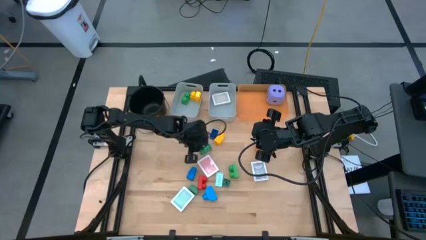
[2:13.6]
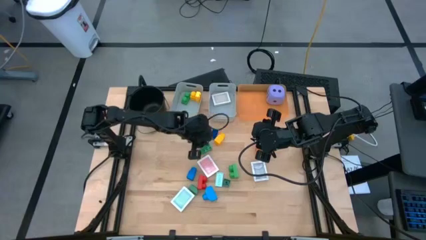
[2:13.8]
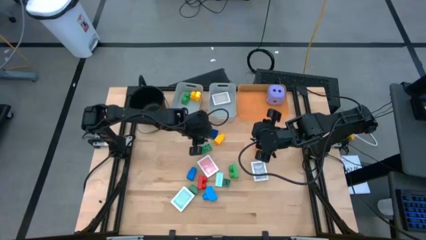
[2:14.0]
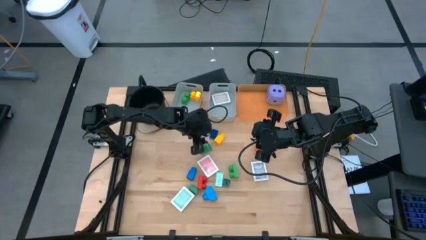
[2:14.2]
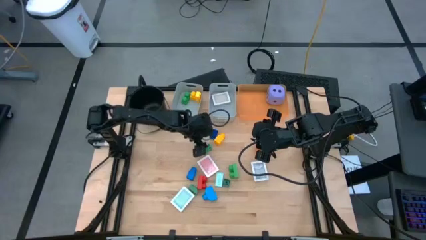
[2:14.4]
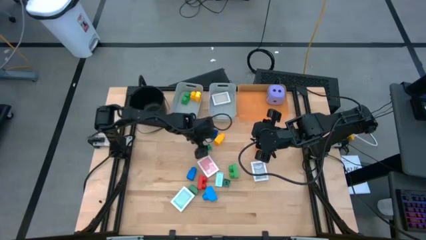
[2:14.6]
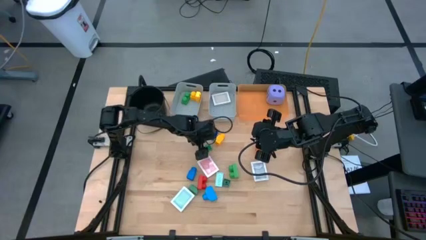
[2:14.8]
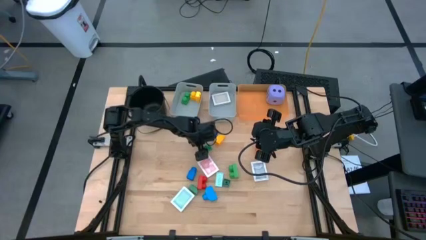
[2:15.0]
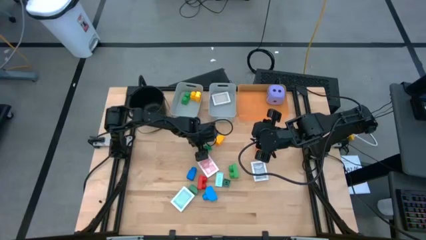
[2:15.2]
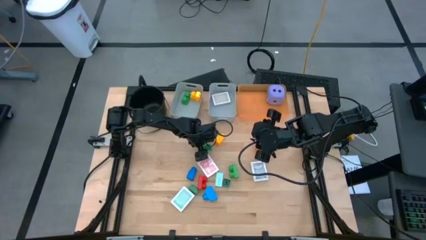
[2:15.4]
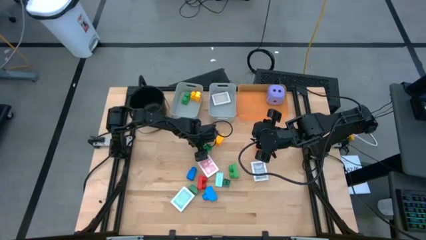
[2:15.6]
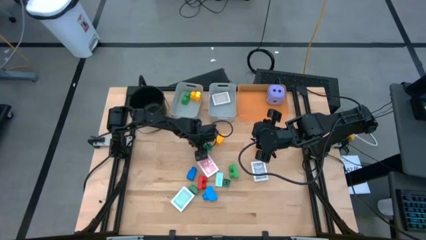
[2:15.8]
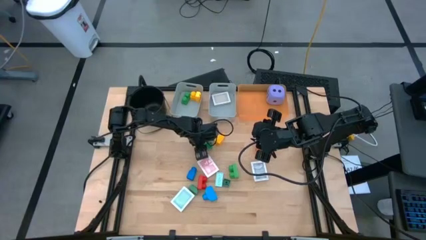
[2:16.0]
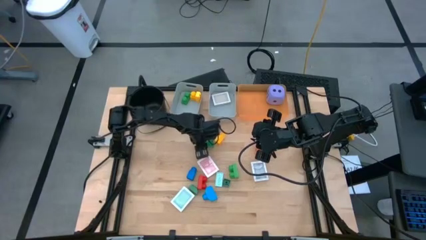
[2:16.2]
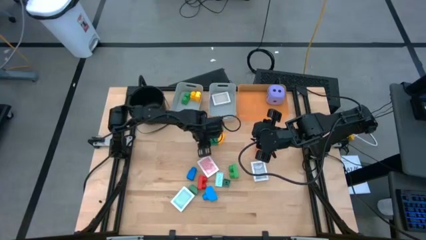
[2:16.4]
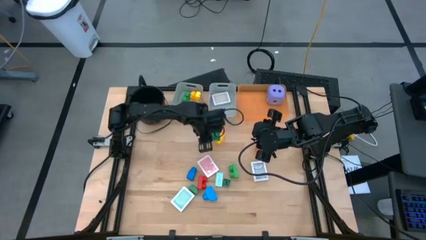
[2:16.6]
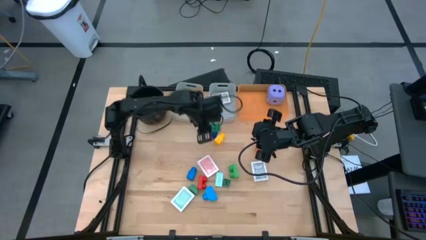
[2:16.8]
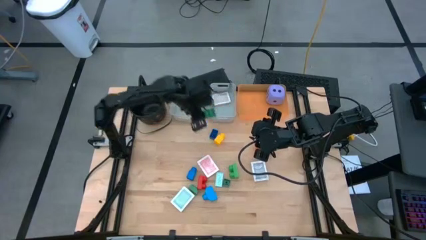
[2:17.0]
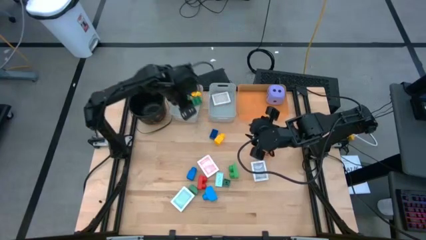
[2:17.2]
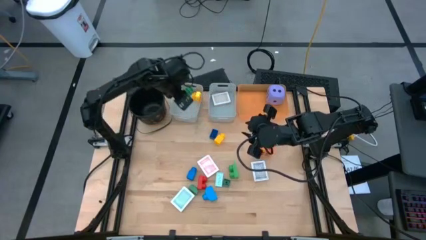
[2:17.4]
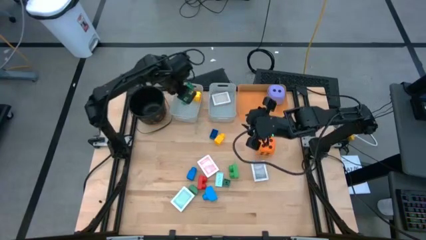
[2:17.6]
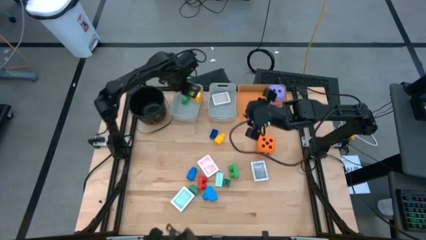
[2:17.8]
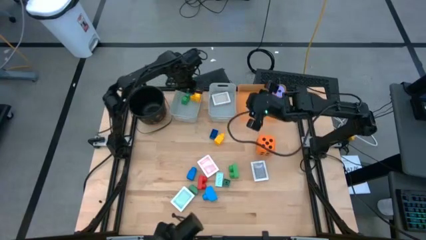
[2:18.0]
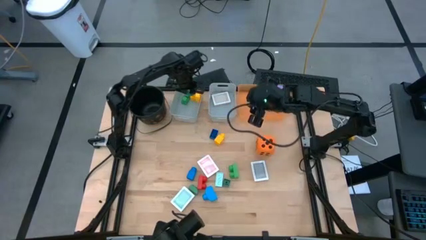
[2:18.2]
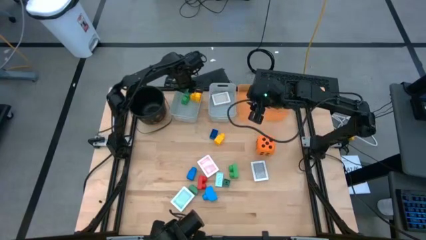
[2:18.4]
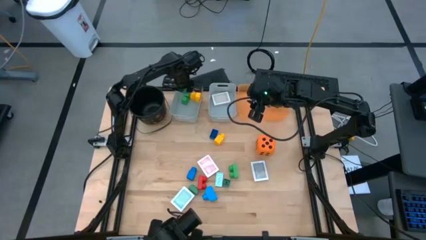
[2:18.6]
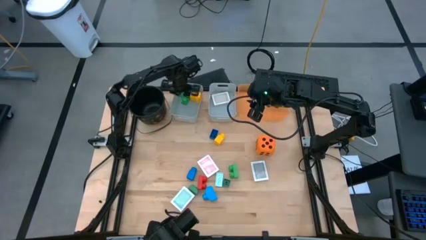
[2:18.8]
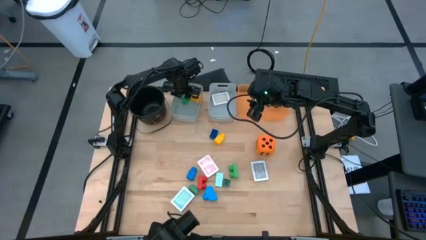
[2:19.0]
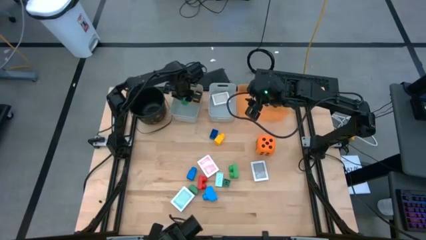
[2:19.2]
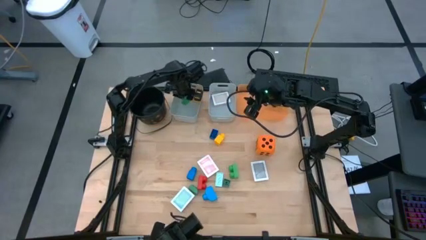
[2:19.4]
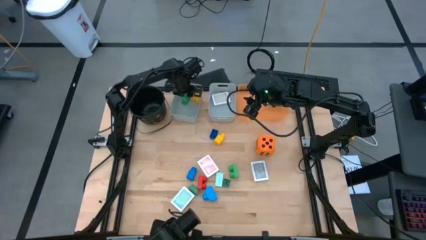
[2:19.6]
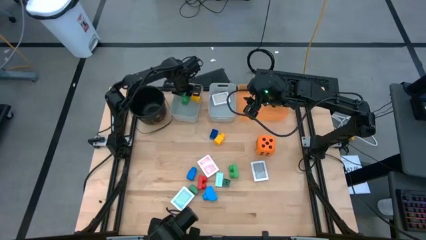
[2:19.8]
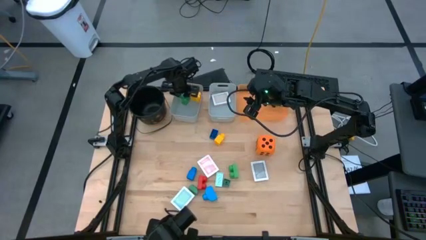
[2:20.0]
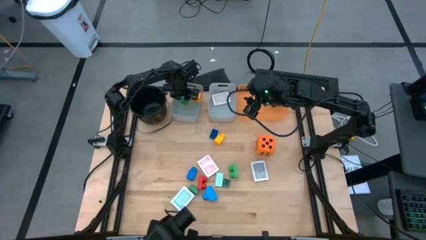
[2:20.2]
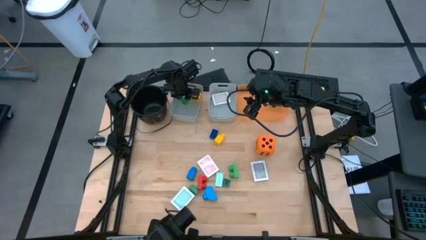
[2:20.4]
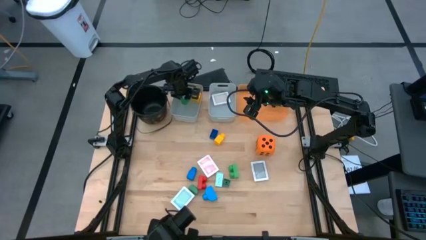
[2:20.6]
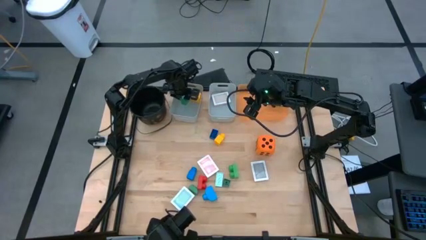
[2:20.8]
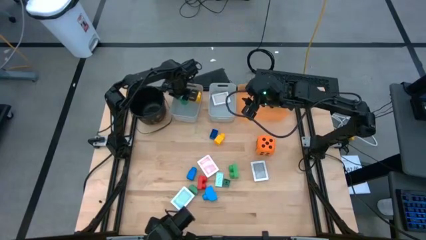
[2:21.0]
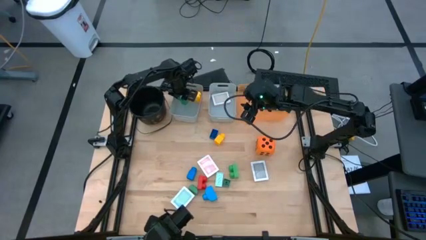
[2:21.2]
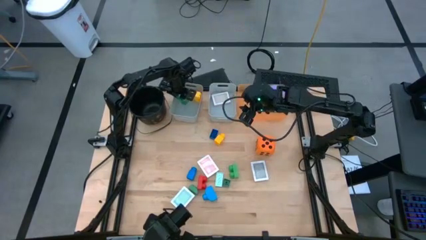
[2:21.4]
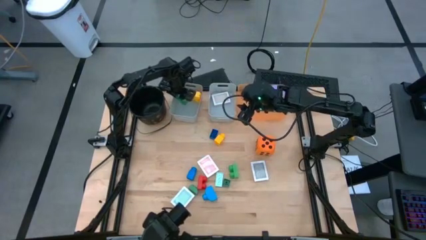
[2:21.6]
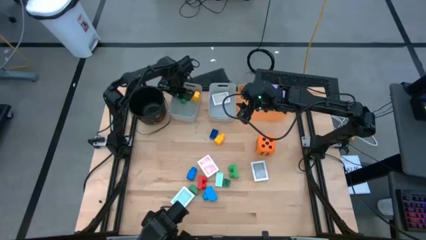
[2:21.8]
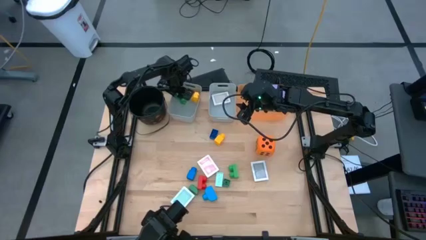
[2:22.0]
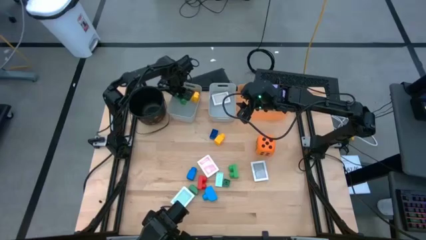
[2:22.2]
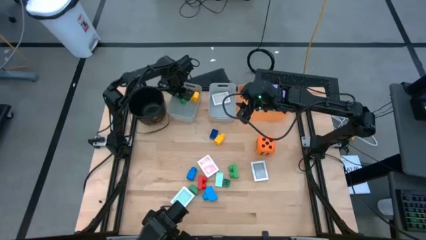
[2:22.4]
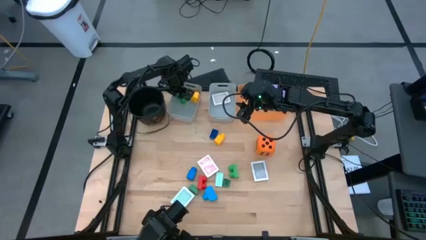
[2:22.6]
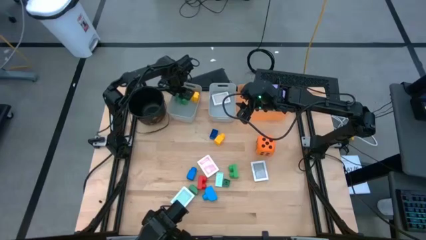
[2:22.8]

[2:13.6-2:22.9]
Task: Pick & Place Toys
Put the green game piece into the left gray bin
